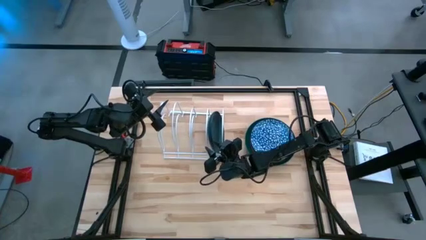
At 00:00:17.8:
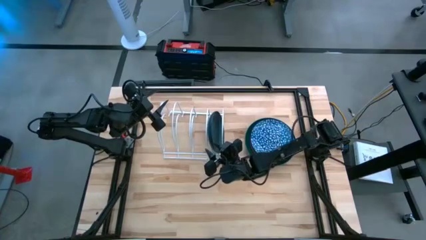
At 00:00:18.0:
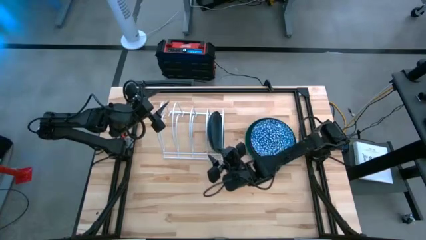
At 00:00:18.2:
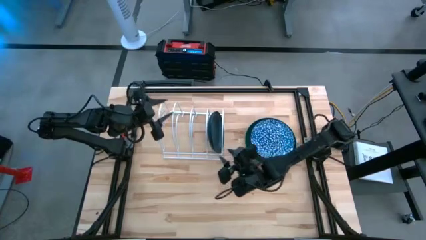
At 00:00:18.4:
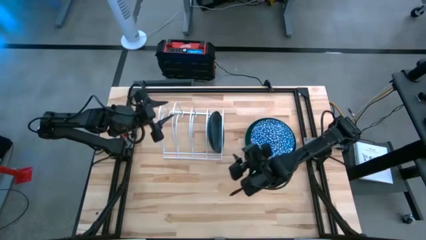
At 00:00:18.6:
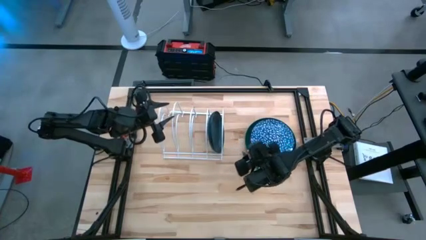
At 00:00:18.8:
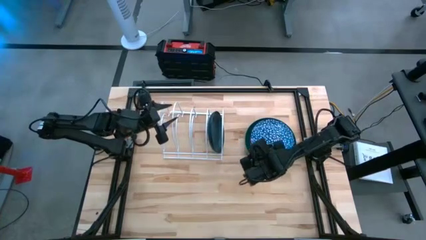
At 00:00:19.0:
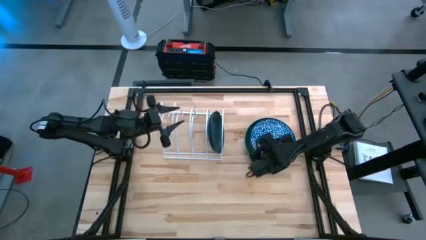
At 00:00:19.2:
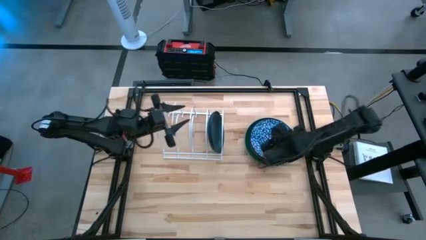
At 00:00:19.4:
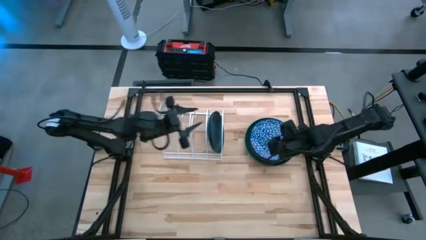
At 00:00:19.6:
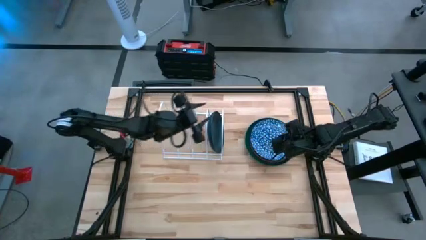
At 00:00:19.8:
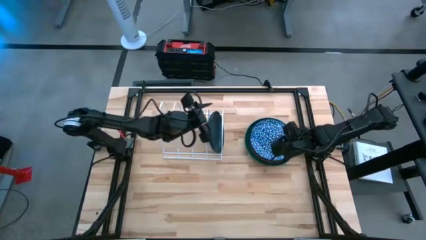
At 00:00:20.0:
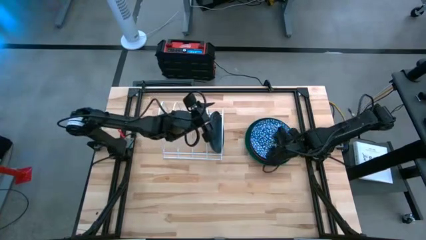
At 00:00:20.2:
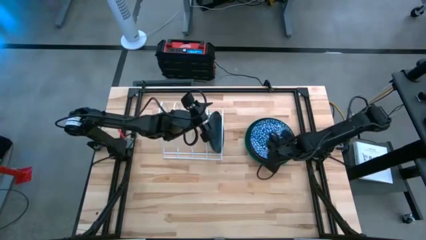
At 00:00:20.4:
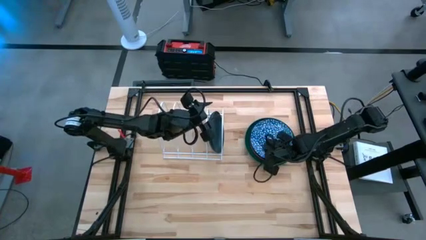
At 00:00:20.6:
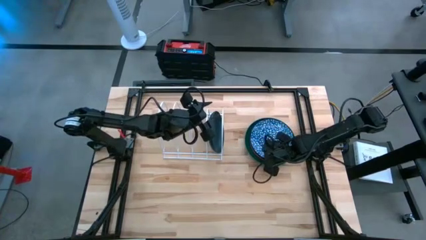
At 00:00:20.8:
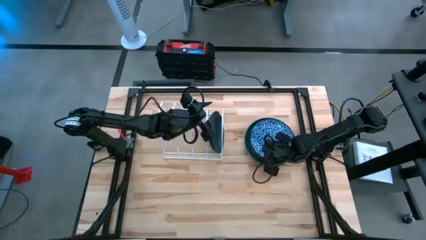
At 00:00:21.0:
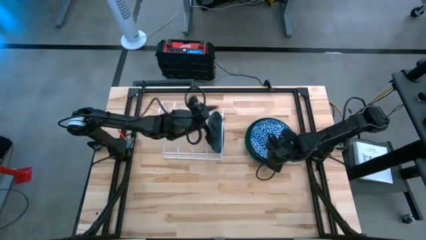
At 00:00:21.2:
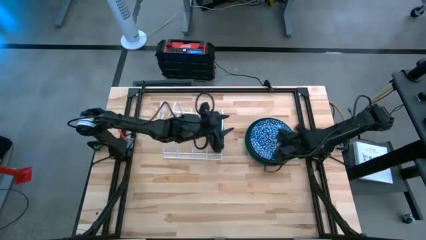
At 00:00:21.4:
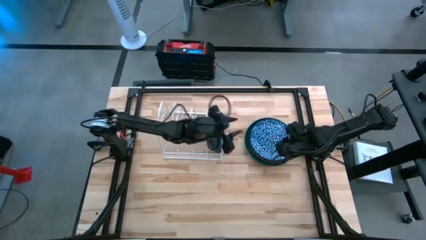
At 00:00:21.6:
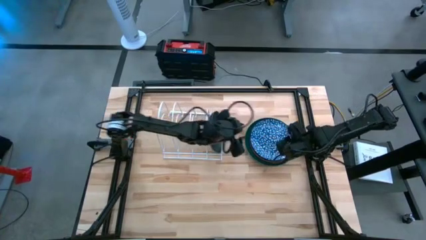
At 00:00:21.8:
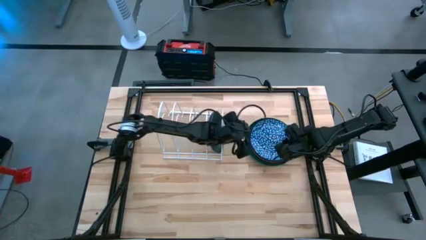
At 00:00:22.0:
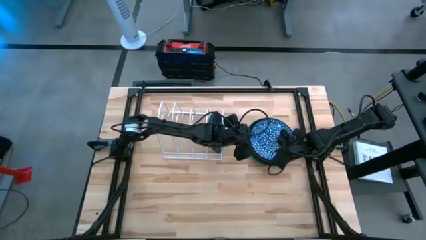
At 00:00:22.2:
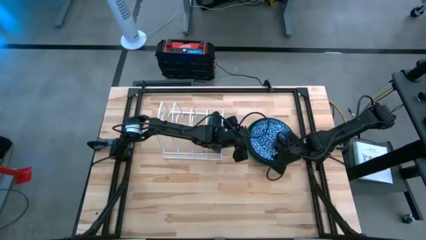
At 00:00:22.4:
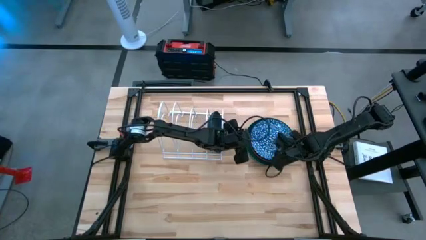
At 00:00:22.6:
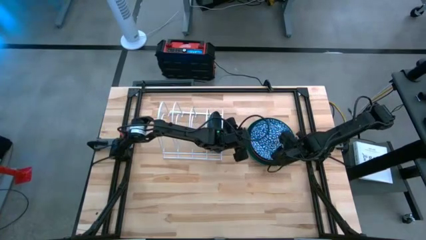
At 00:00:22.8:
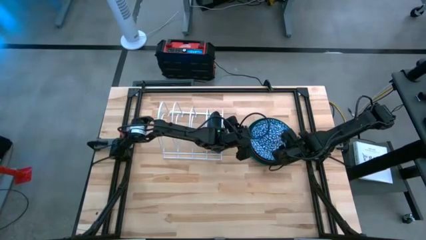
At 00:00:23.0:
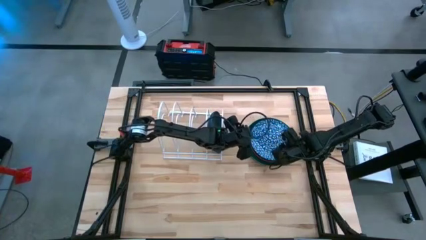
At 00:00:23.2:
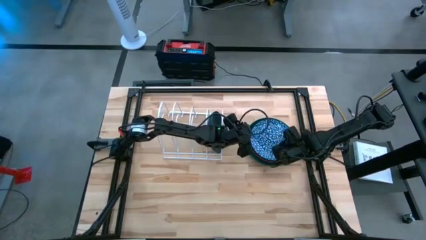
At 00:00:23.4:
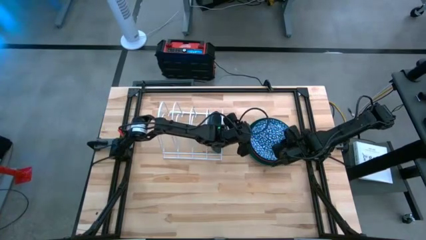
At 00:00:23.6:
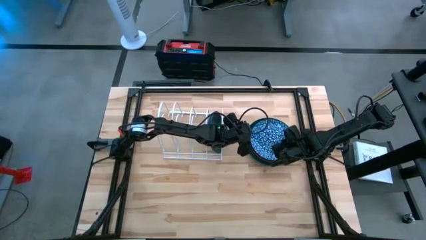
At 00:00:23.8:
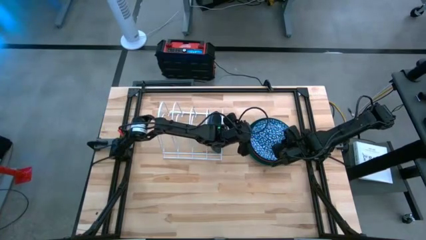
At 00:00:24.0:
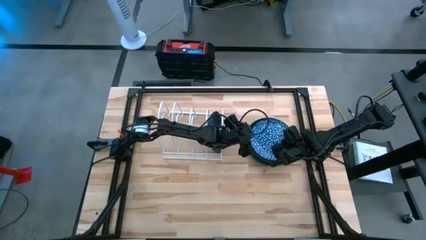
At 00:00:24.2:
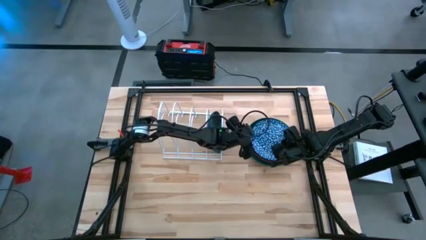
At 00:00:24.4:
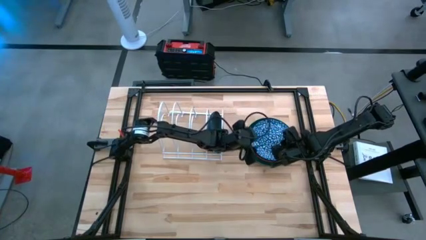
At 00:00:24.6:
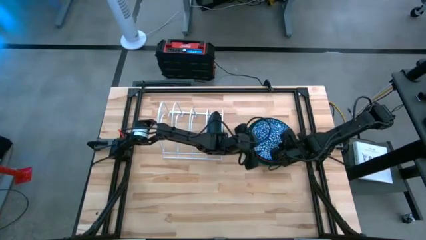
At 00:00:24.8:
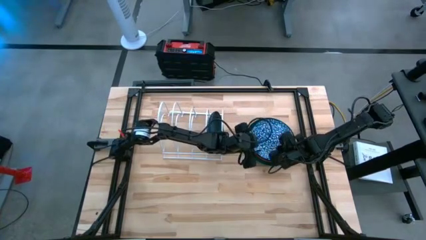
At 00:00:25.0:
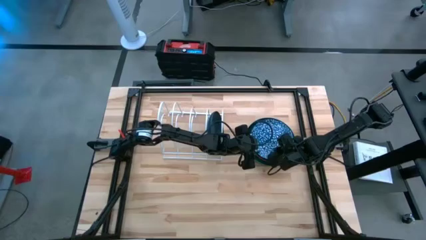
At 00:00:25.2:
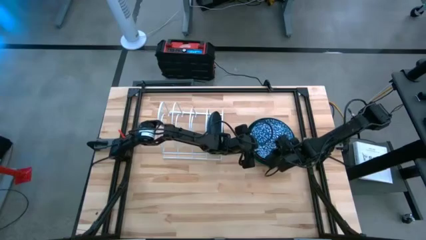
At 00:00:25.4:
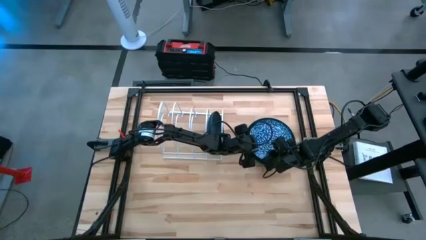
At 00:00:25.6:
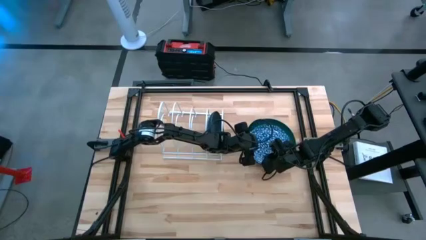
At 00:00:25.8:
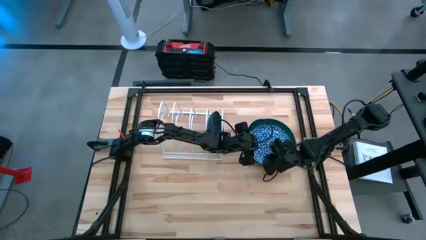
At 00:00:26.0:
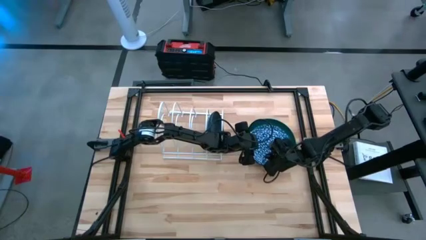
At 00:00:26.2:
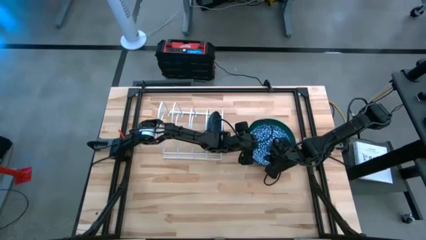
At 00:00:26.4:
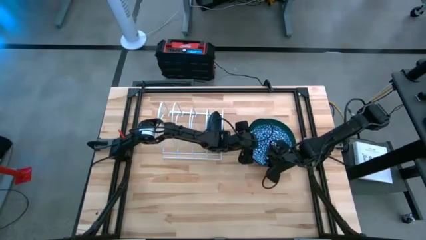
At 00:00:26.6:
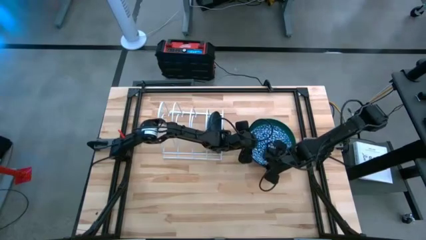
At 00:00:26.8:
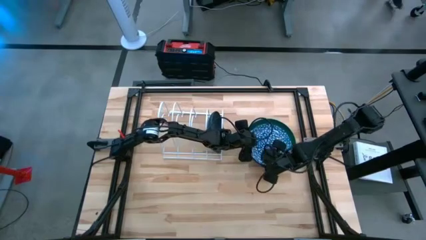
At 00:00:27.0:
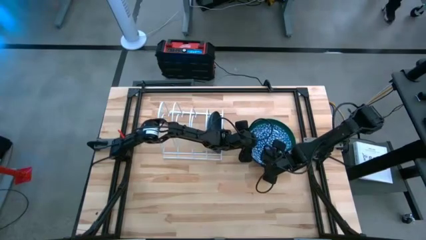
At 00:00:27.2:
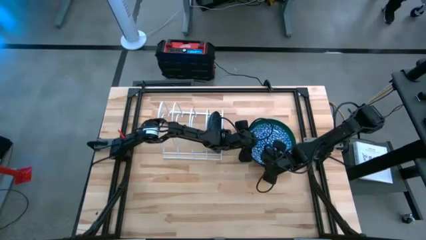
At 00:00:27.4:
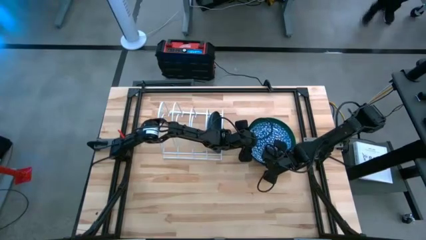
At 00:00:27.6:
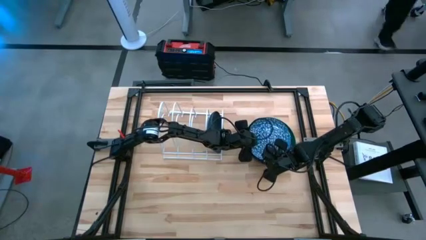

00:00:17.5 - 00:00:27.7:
Task: Sort dishes
Put the blue patterned plate into the dish rack

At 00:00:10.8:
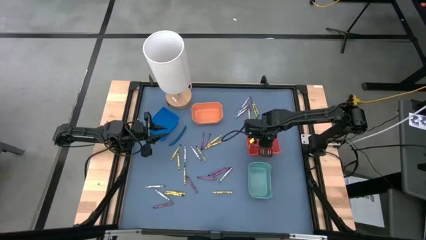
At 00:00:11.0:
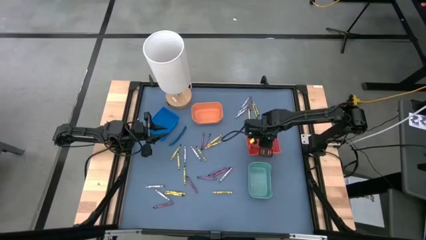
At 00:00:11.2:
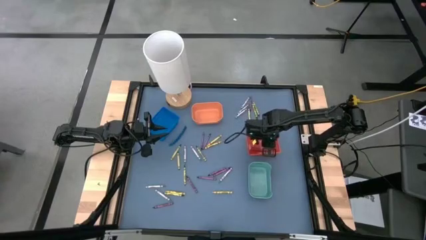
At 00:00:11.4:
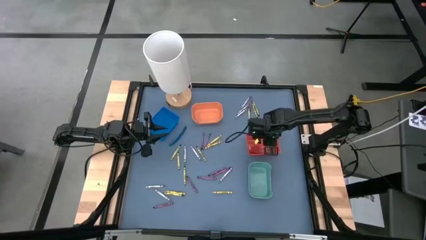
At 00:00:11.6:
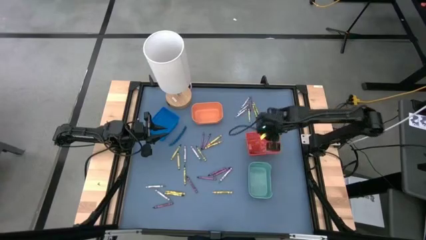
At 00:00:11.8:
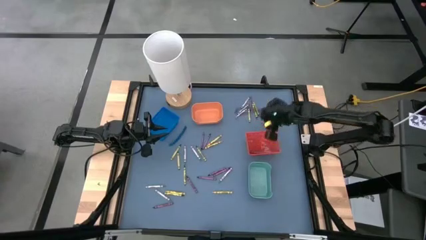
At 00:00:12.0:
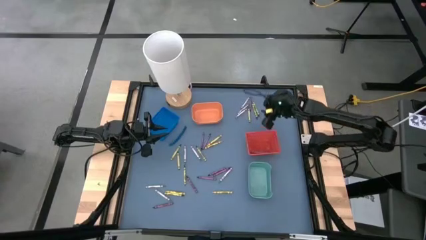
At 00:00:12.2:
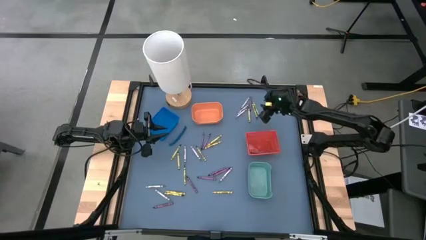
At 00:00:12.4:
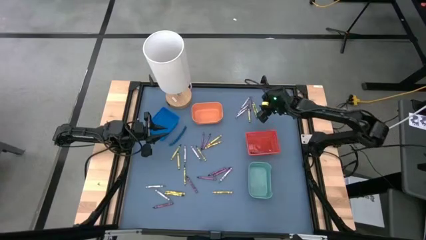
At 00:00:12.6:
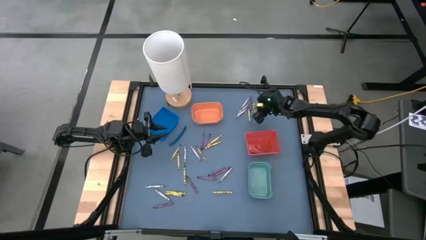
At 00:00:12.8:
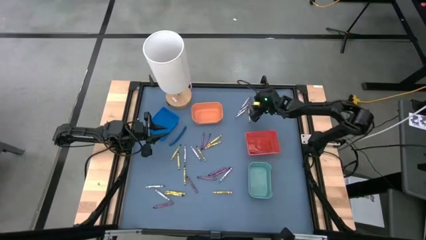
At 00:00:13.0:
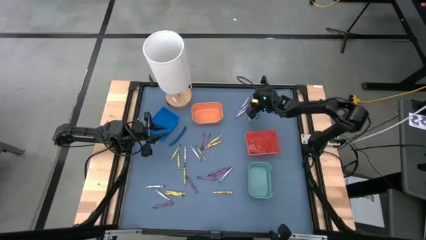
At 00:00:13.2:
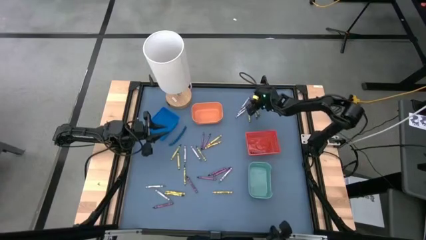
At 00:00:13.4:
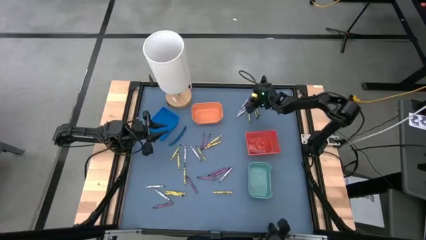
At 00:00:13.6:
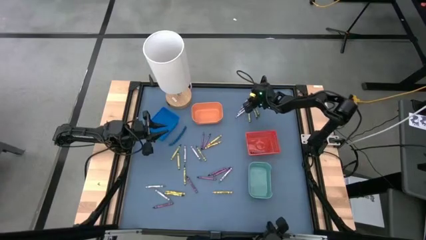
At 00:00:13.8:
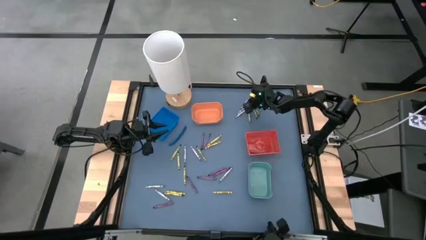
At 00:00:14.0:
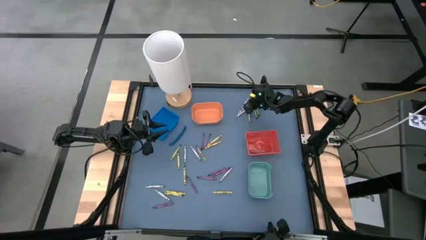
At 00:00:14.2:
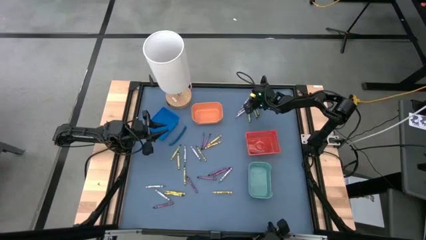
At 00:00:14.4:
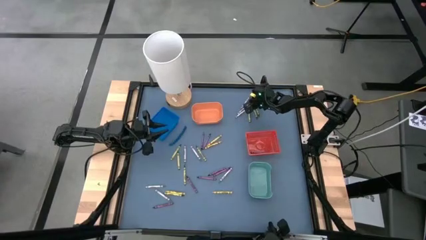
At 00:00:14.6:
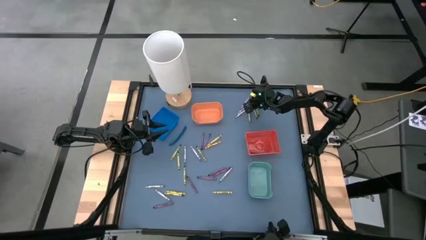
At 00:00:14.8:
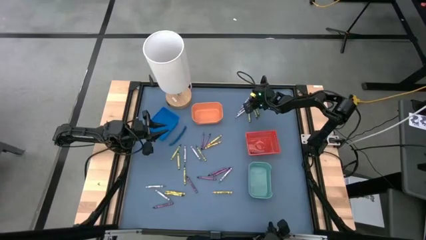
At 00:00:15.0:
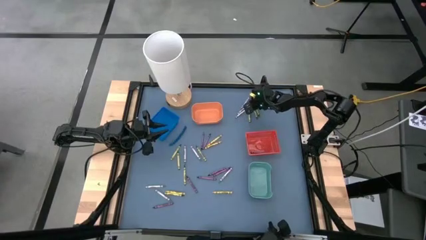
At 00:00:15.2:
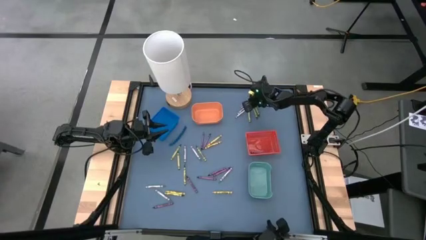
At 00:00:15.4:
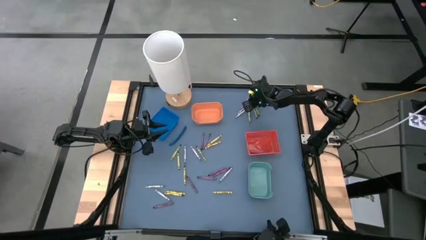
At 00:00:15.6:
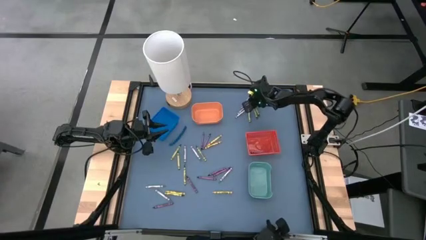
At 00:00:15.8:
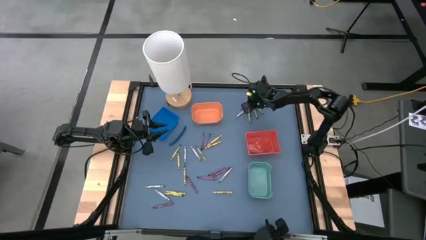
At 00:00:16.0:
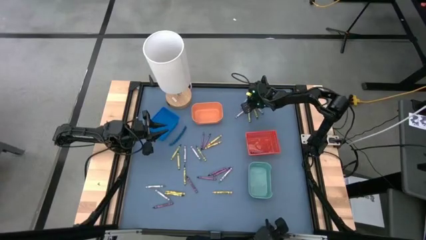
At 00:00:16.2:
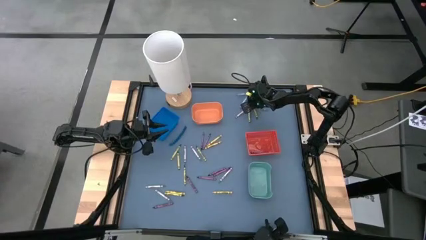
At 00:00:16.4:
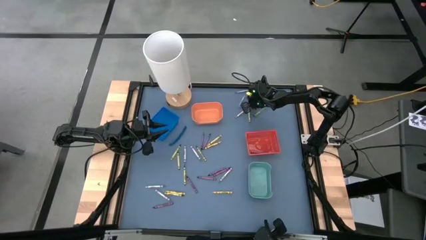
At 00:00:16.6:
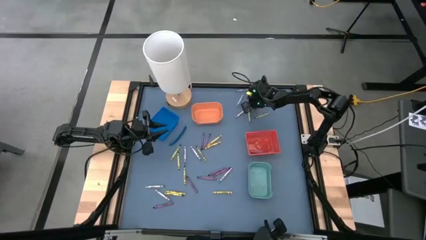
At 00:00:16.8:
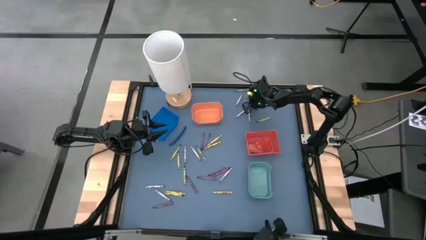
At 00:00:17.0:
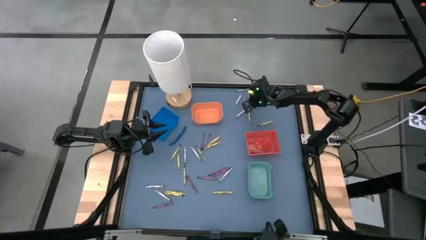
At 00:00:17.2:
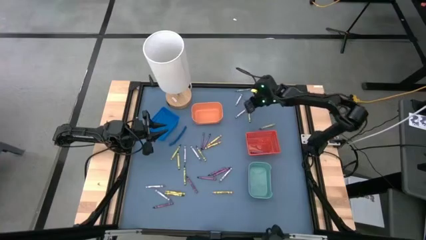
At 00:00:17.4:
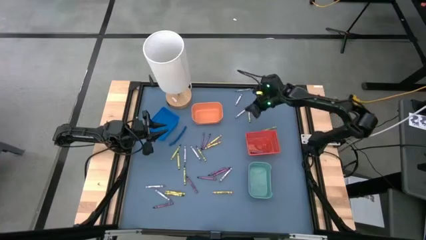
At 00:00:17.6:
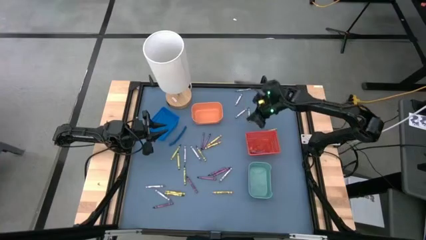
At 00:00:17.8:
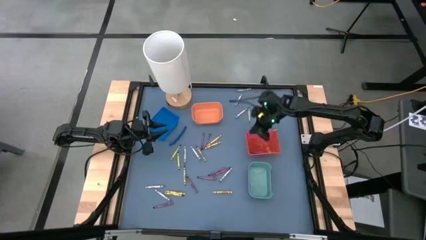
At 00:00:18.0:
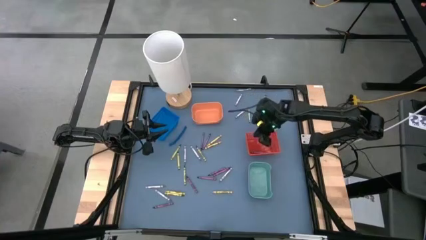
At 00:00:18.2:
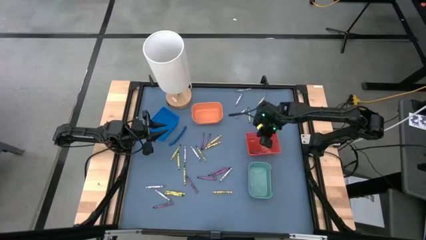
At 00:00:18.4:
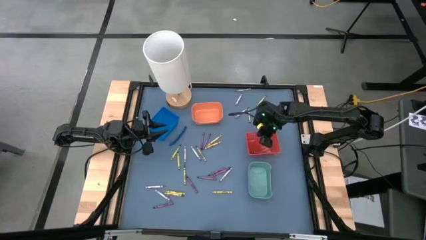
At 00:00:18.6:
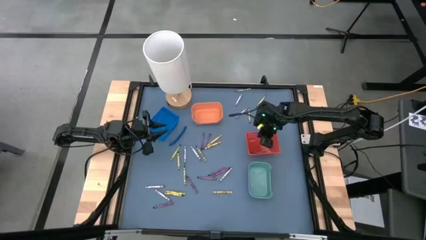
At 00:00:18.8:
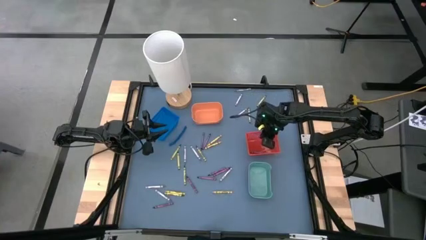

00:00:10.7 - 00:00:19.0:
Task: Sort crayons
Put the violet crayon into the red bin
